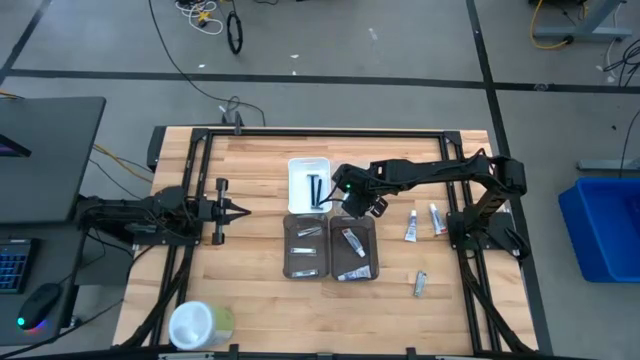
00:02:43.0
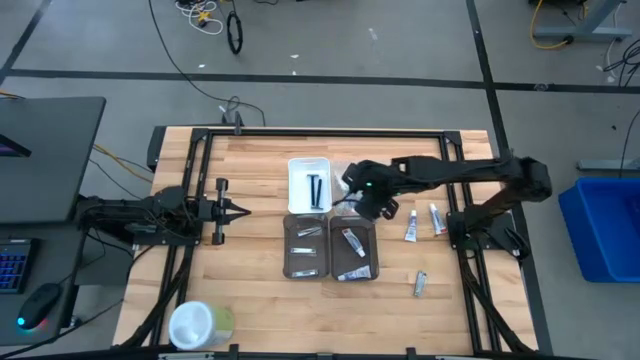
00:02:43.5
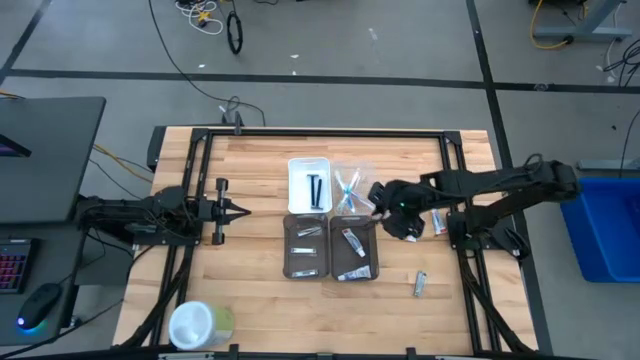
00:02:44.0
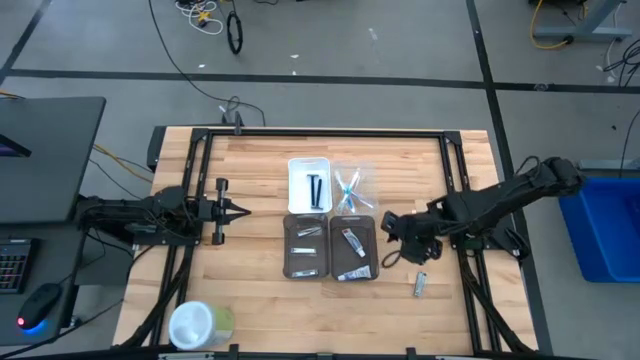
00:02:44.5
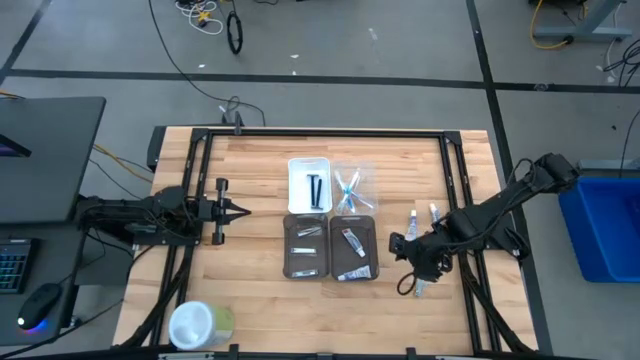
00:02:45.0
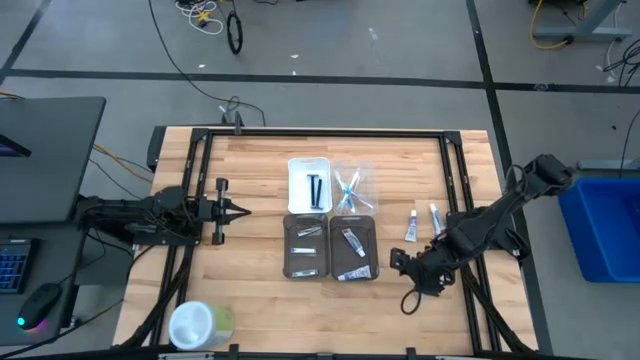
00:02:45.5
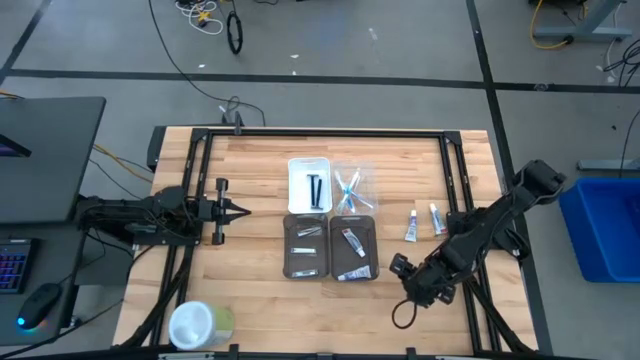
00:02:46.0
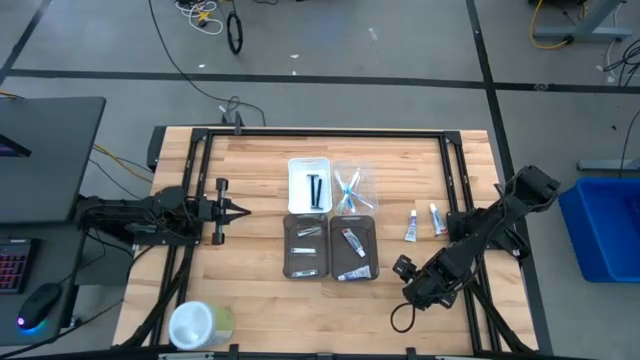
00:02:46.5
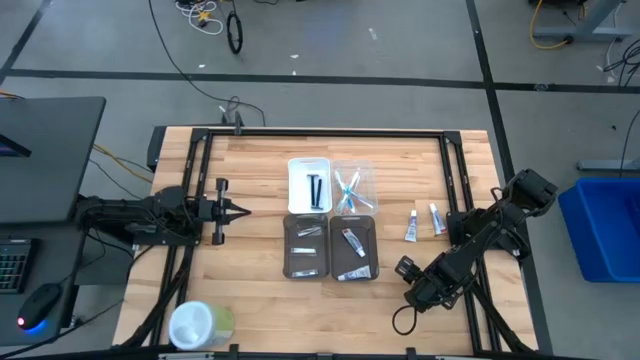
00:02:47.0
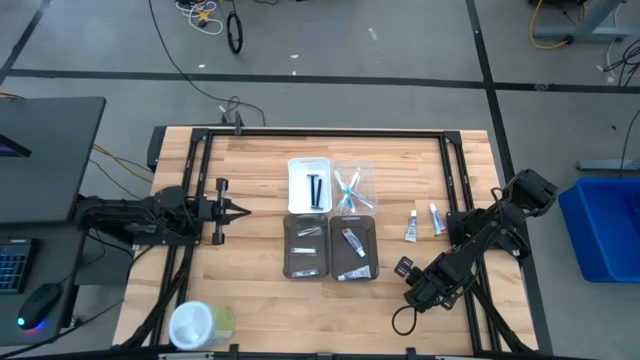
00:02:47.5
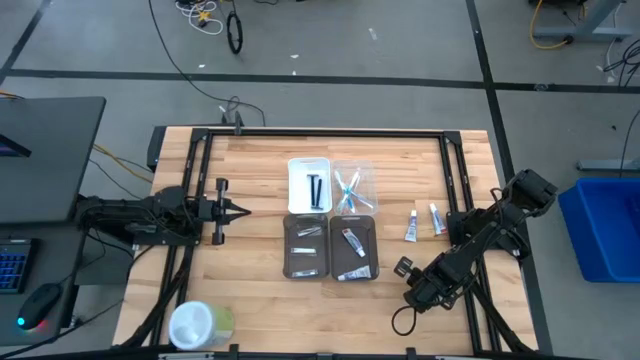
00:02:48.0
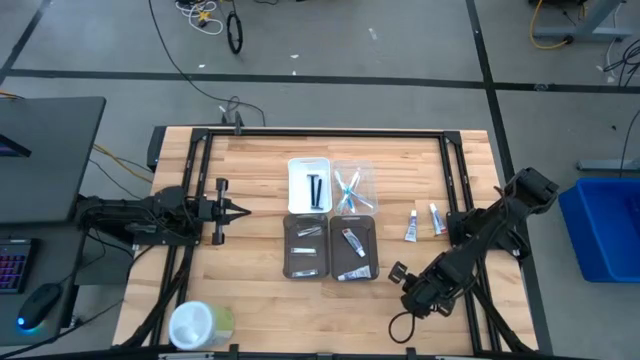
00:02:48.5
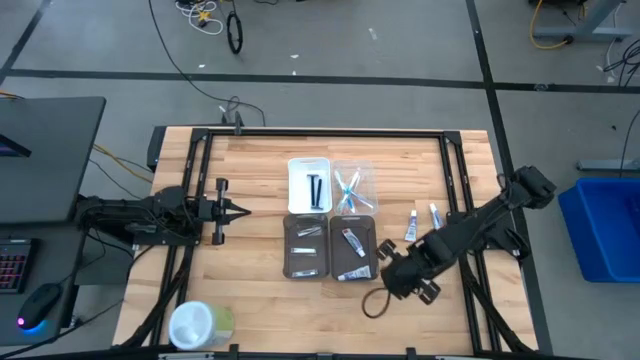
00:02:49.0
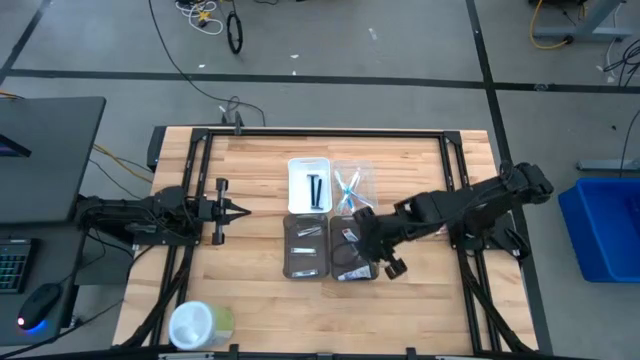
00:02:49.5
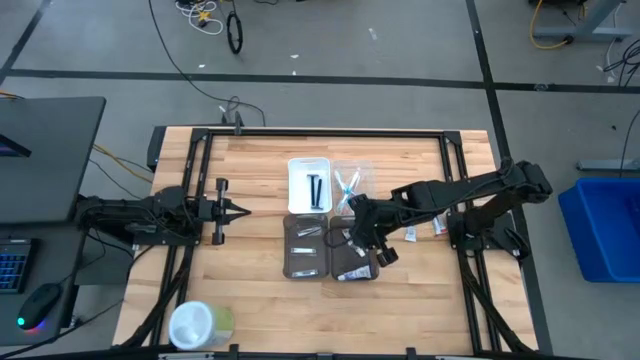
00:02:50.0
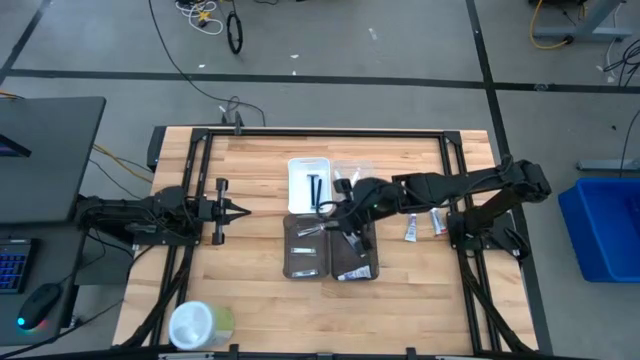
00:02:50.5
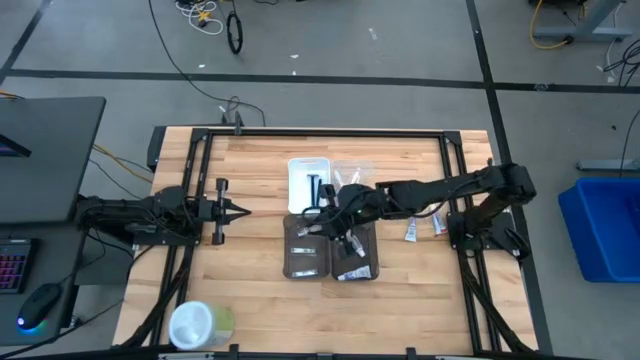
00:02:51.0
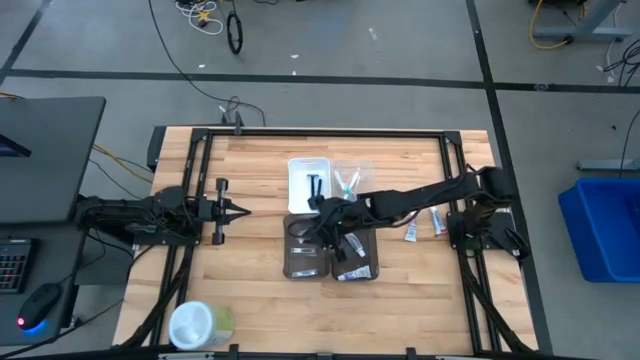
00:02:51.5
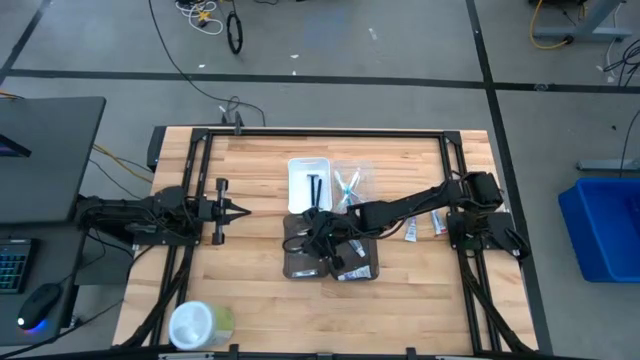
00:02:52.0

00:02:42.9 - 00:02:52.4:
Task: Pick & Place Travel size toiletries
Put the silver nail cutter into the left black bin

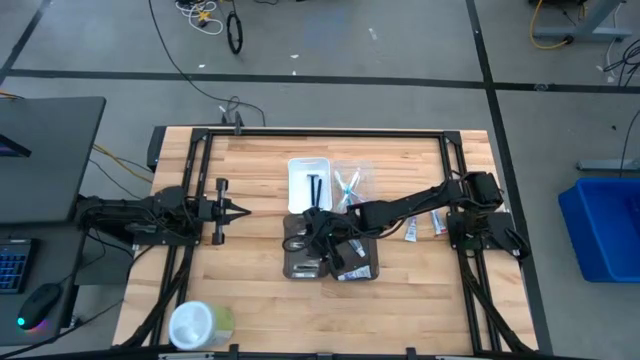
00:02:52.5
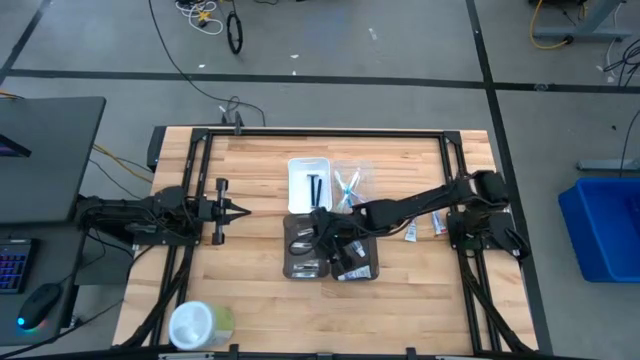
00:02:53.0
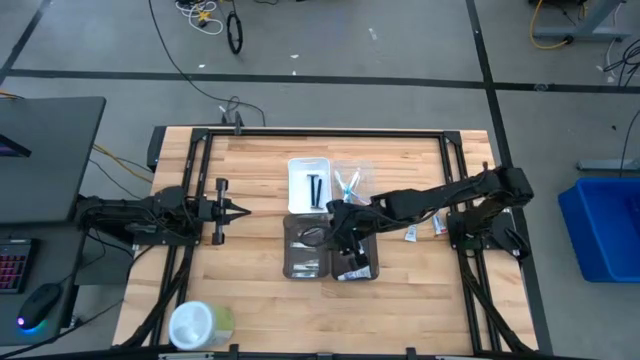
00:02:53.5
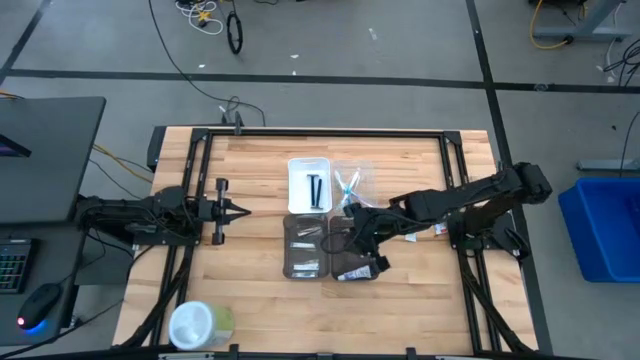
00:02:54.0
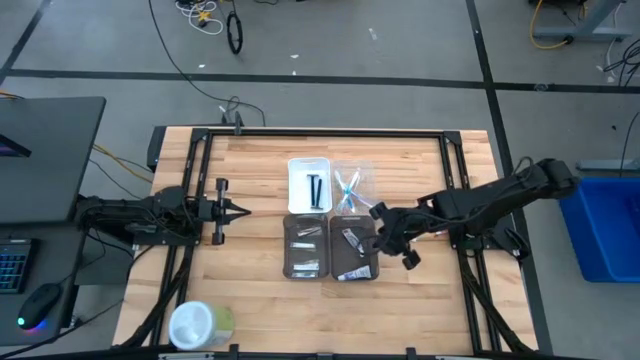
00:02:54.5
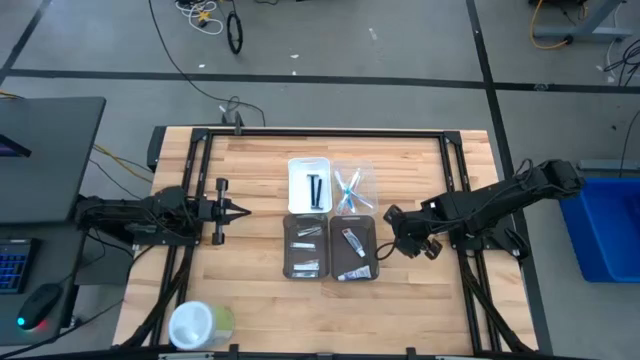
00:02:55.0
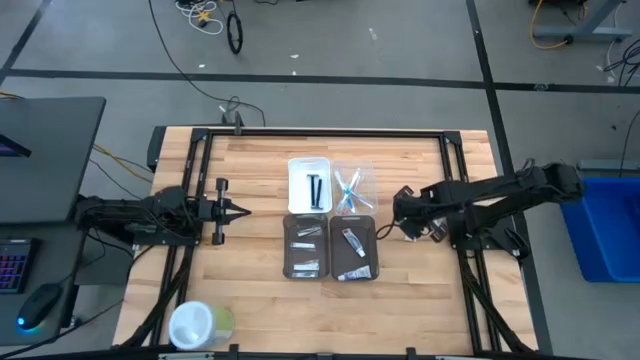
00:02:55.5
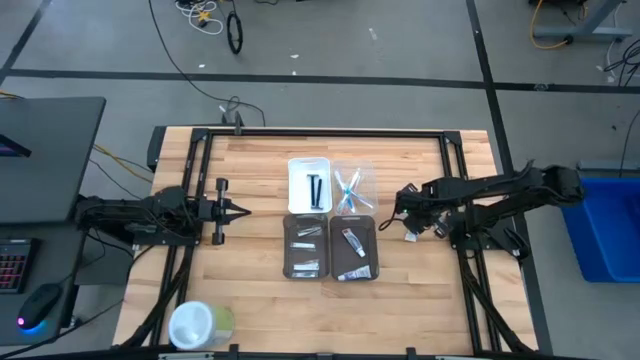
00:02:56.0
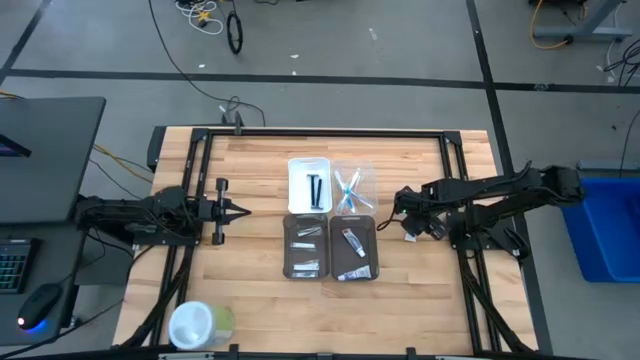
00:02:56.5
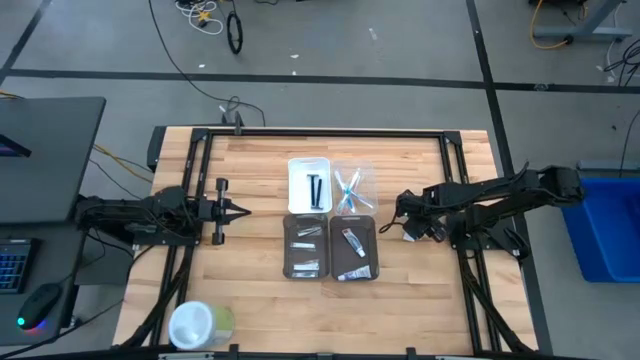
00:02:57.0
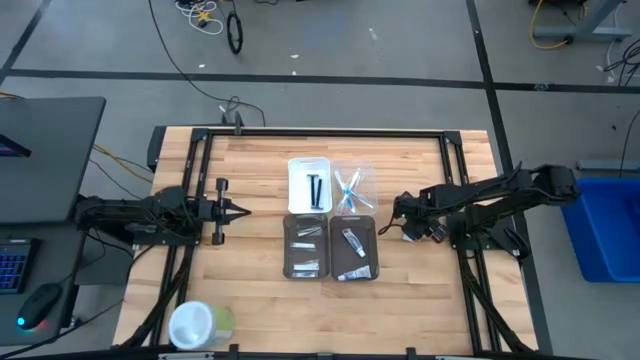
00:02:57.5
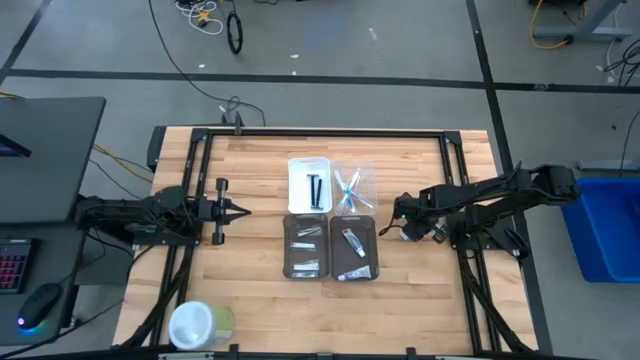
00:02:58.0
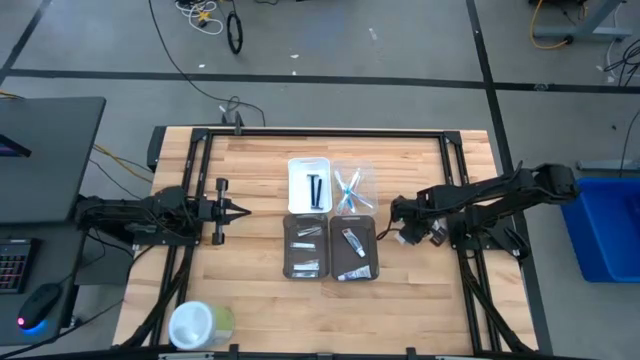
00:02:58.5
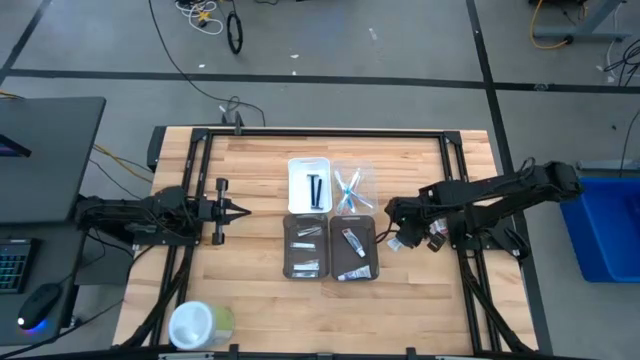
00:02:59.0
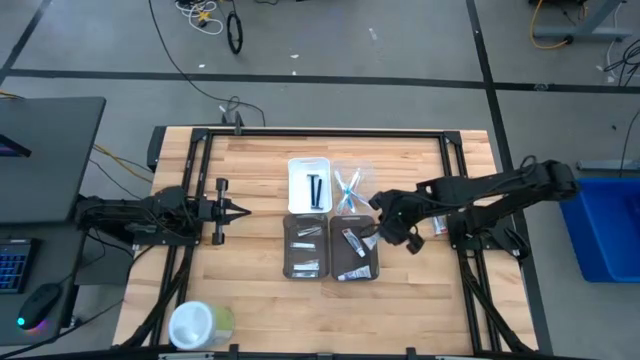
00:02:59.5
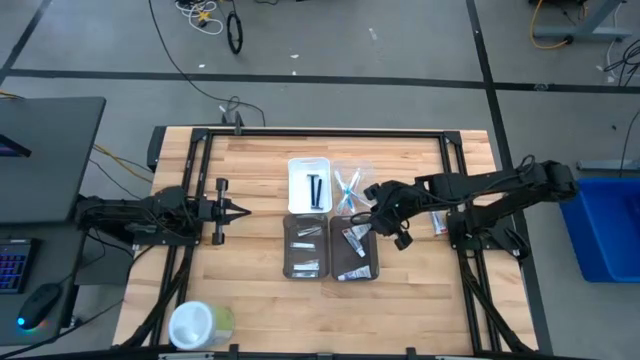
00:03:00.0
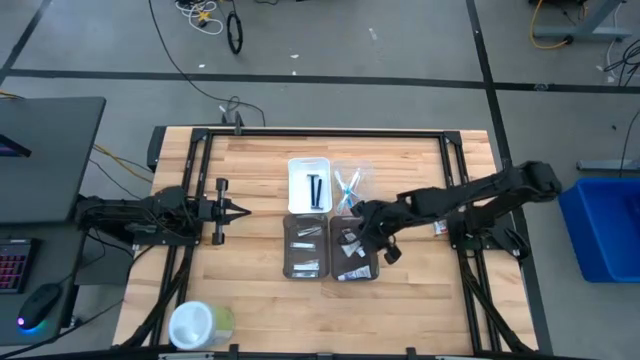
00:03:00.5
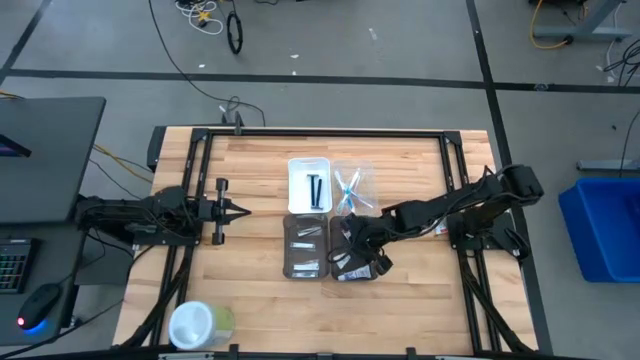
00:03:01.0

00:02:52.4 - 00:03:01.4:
Put the white toothpaste into the right black bin

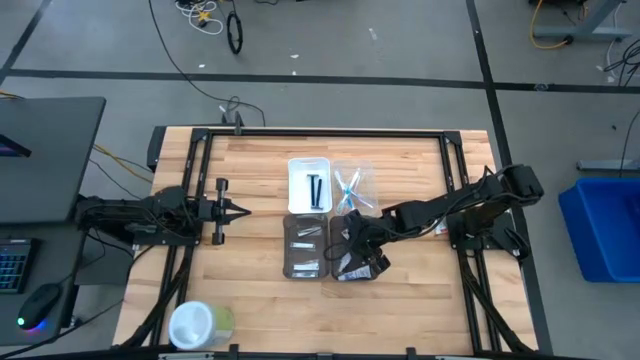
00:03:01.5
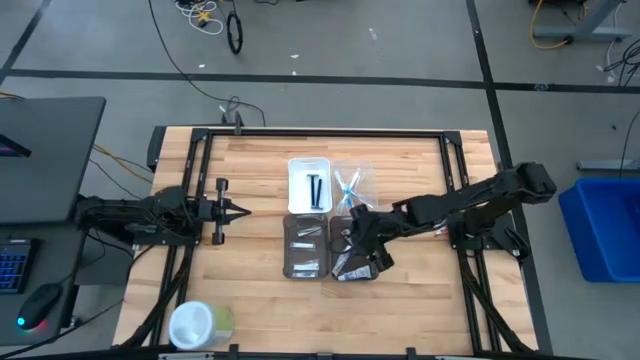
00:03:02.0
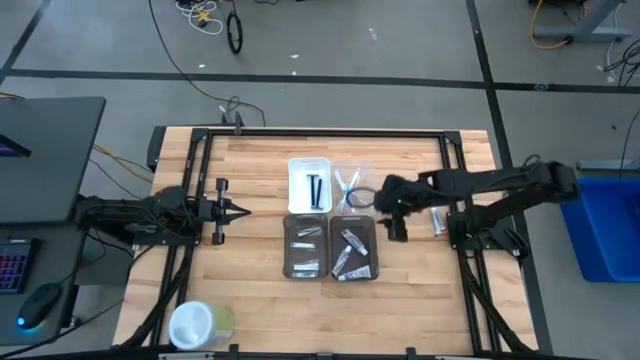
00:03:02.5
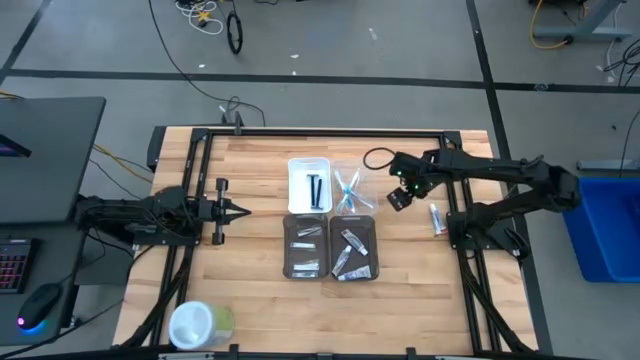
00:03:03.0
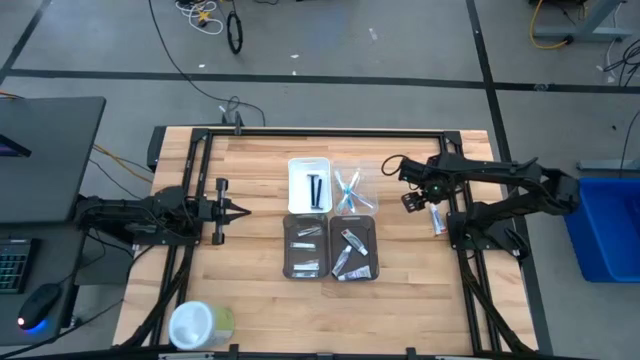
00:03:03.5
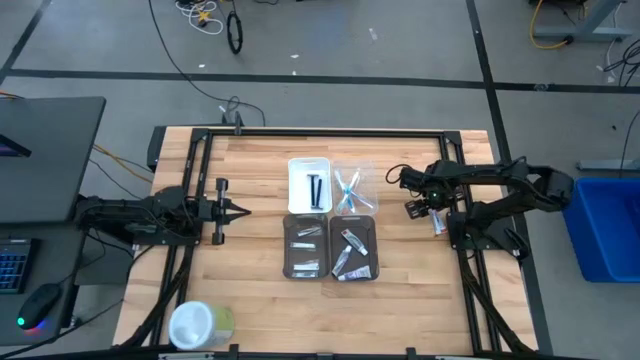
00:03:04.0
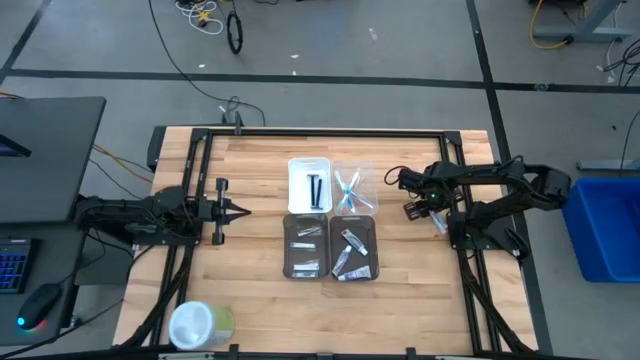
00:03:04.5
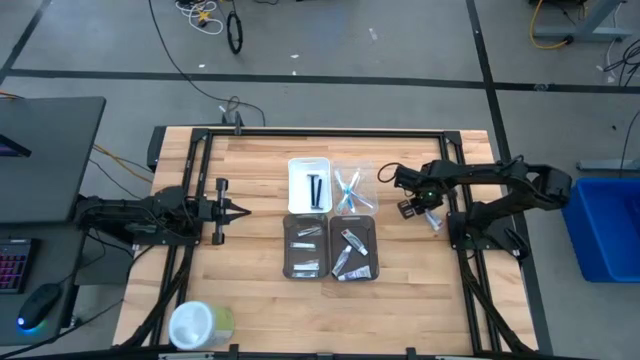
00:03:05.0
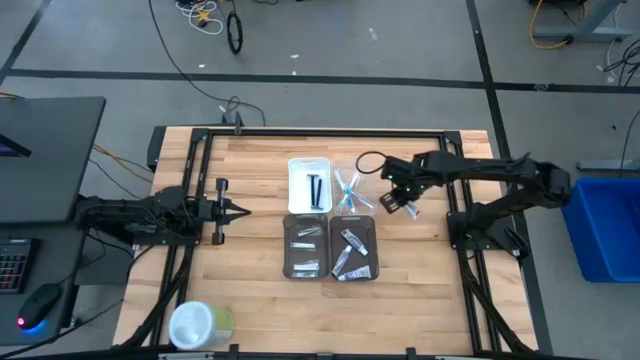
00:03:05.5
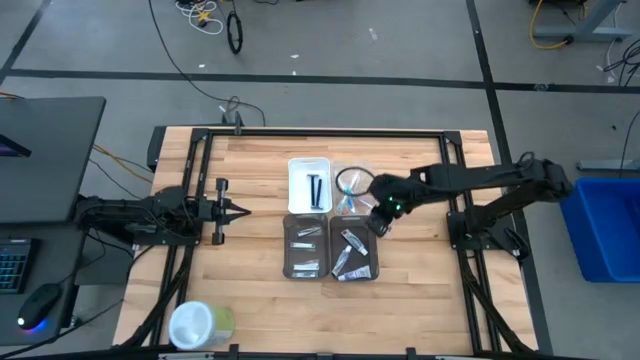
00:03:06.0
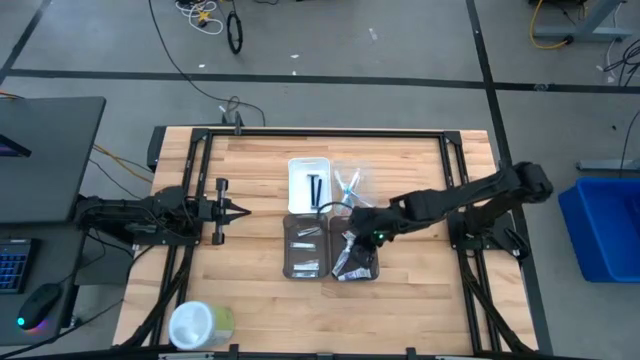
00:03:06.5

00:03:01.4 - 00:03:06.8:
Put the white toothpaste into the right black bin
